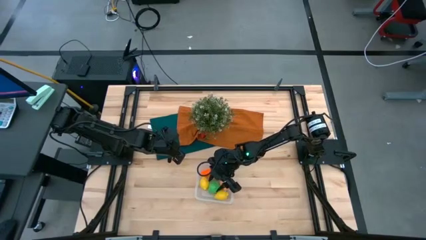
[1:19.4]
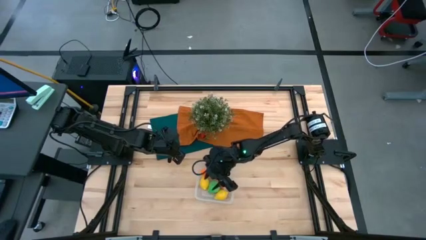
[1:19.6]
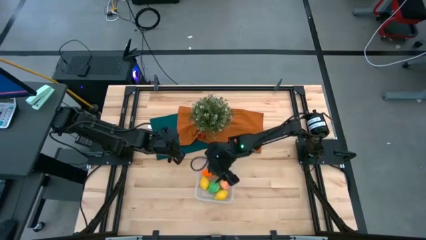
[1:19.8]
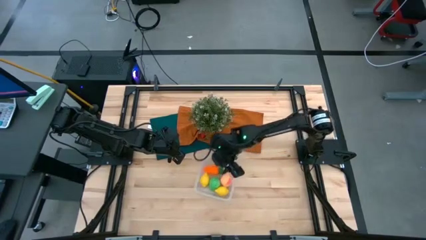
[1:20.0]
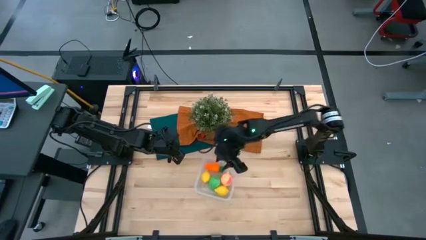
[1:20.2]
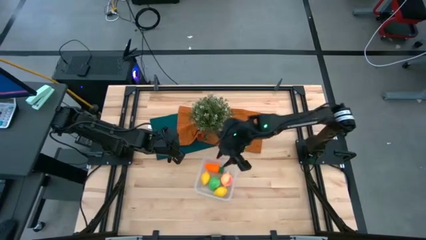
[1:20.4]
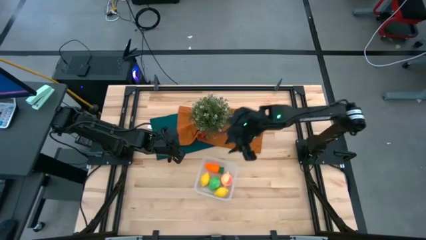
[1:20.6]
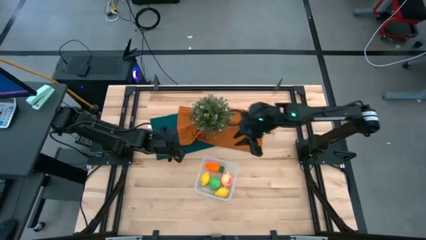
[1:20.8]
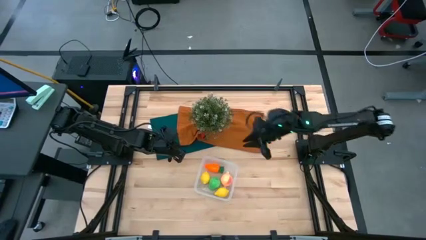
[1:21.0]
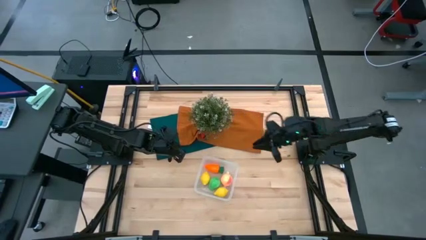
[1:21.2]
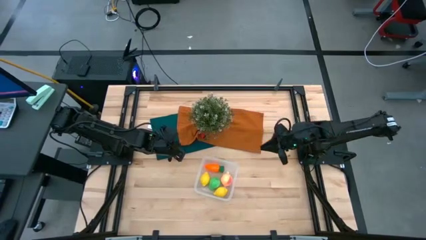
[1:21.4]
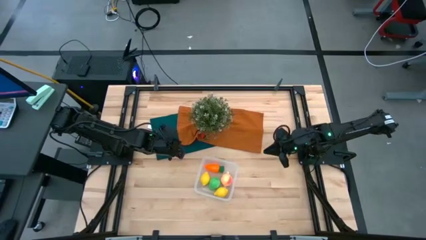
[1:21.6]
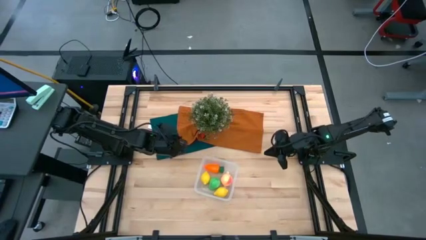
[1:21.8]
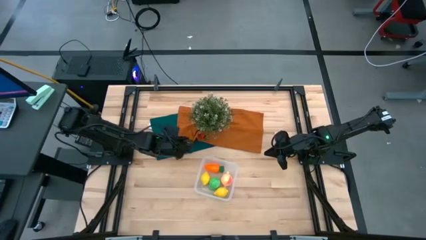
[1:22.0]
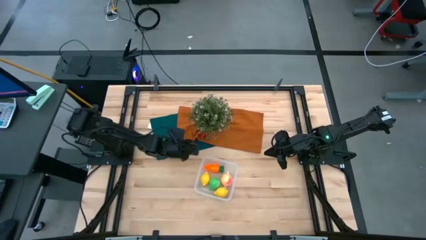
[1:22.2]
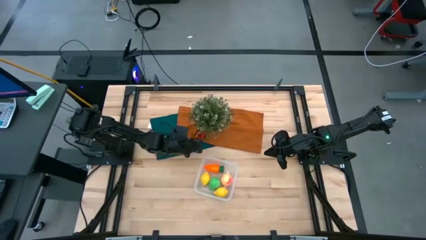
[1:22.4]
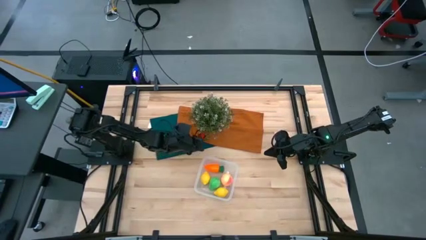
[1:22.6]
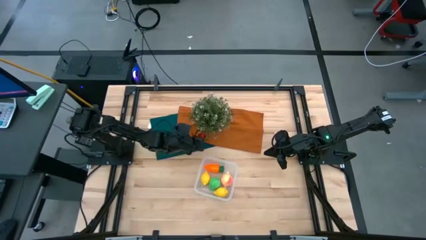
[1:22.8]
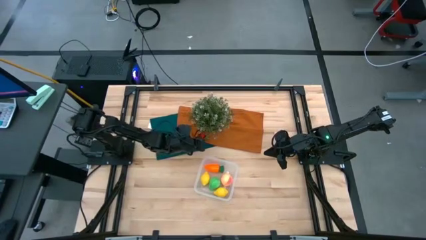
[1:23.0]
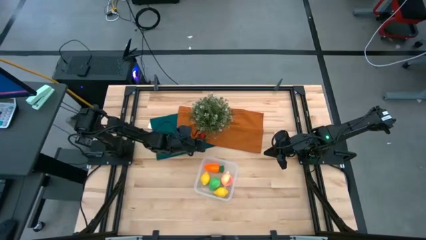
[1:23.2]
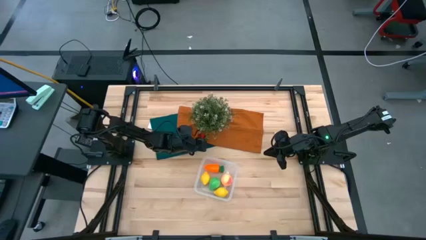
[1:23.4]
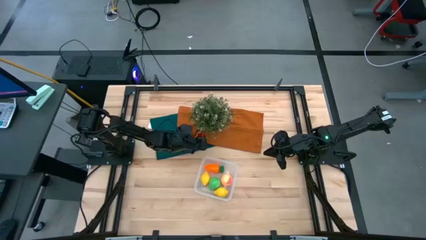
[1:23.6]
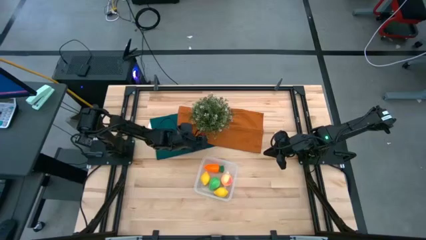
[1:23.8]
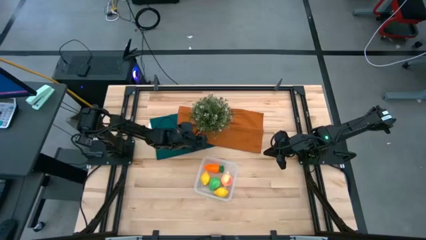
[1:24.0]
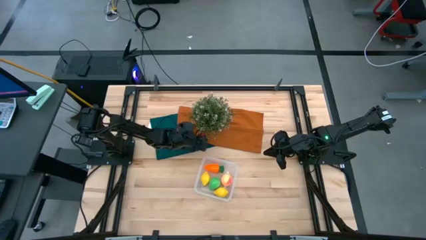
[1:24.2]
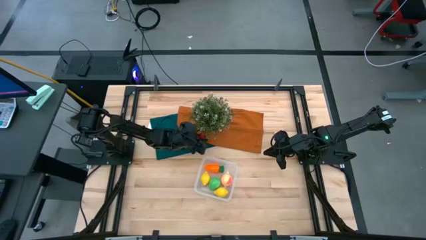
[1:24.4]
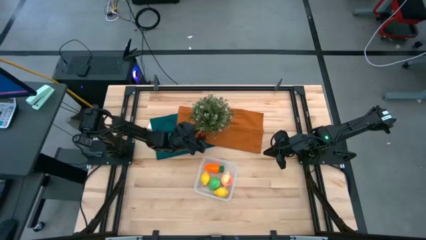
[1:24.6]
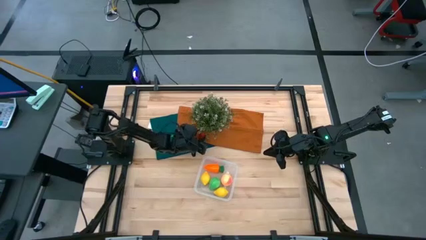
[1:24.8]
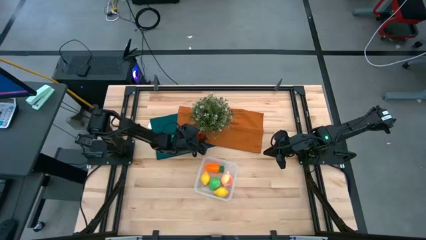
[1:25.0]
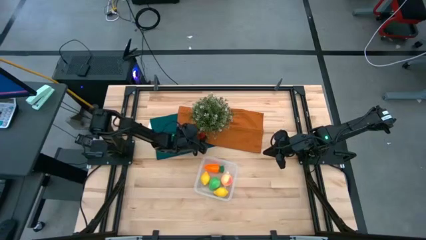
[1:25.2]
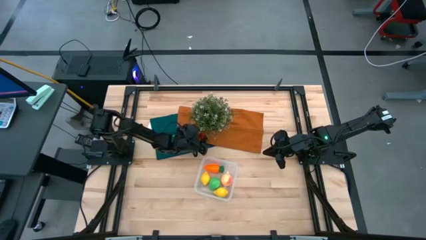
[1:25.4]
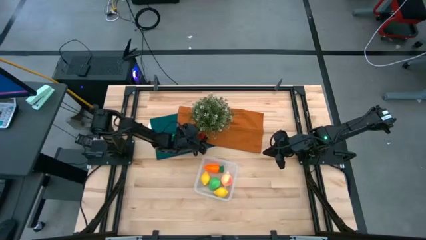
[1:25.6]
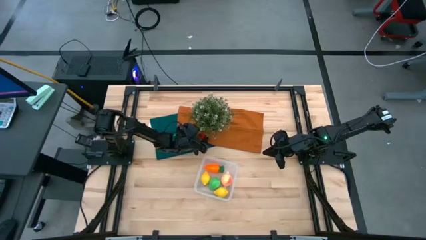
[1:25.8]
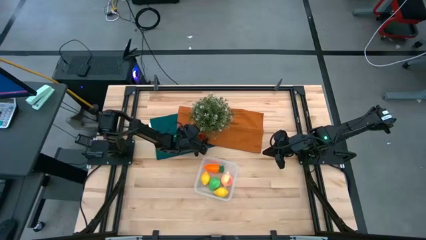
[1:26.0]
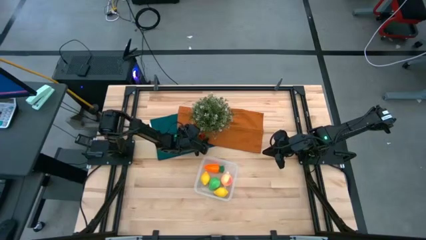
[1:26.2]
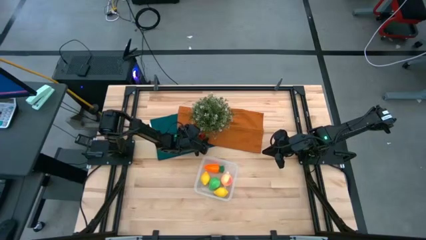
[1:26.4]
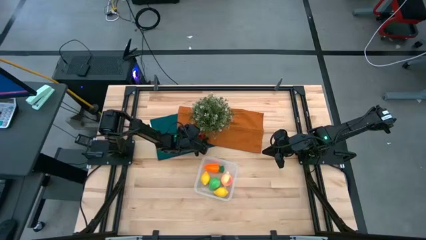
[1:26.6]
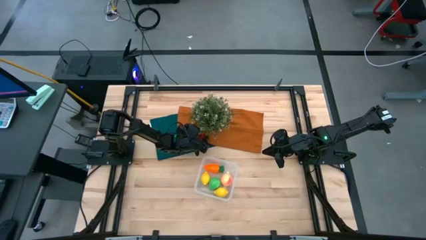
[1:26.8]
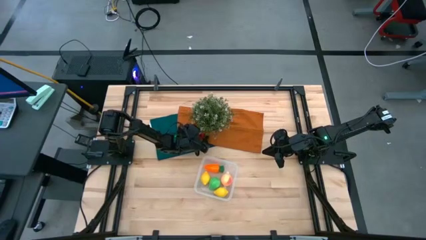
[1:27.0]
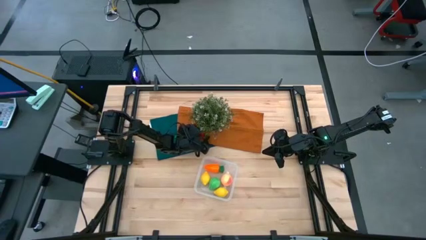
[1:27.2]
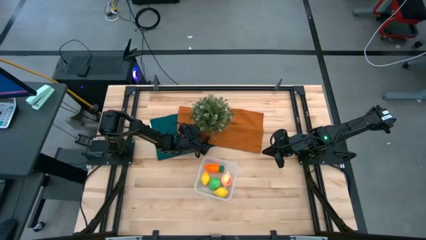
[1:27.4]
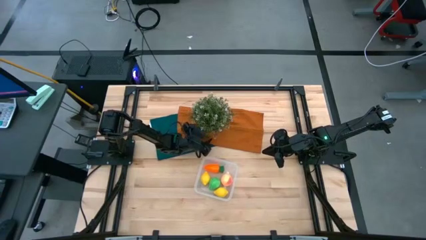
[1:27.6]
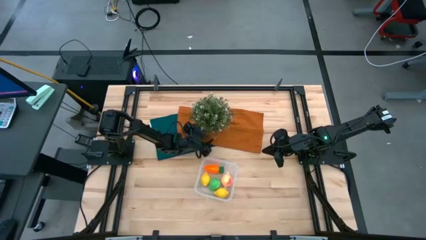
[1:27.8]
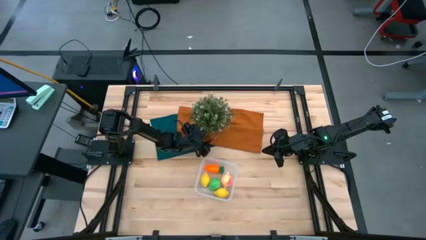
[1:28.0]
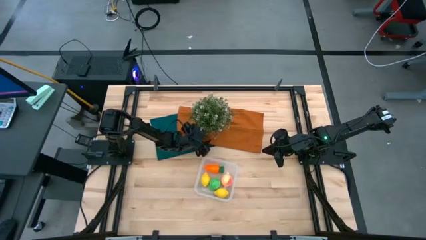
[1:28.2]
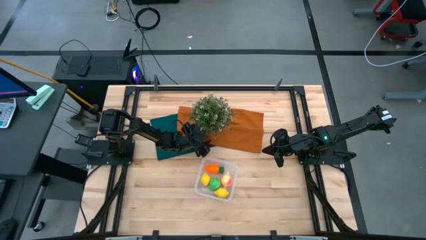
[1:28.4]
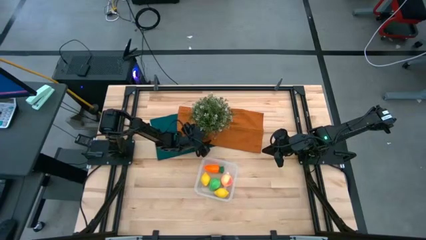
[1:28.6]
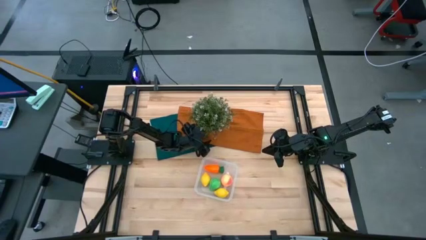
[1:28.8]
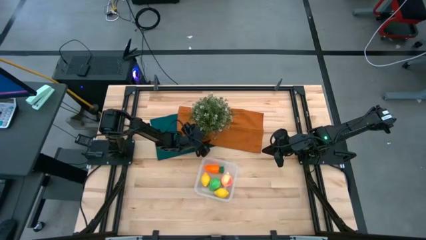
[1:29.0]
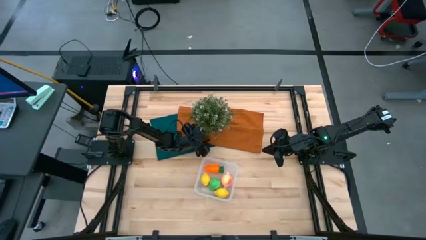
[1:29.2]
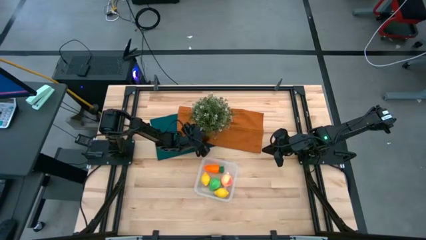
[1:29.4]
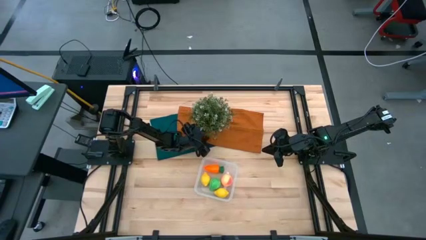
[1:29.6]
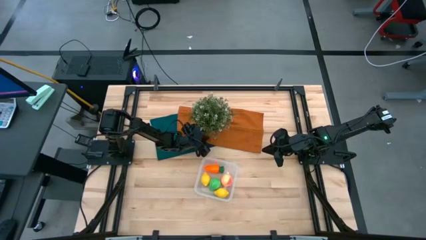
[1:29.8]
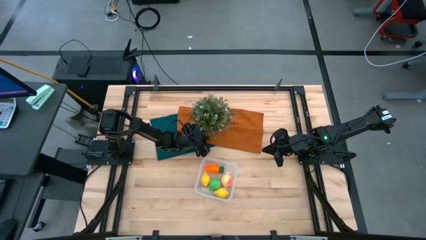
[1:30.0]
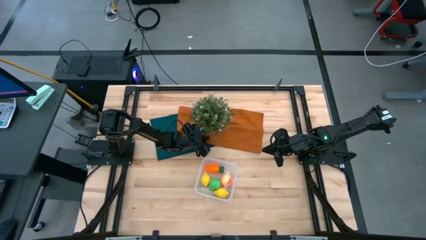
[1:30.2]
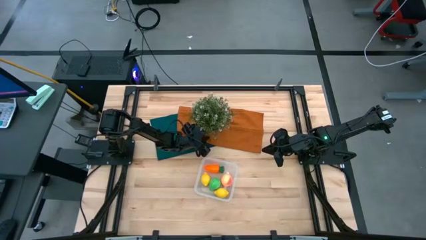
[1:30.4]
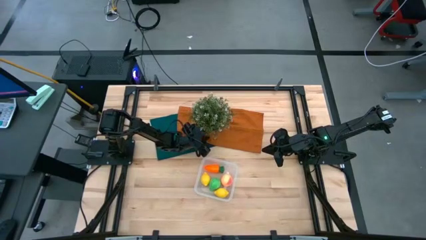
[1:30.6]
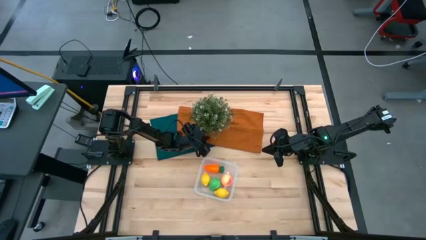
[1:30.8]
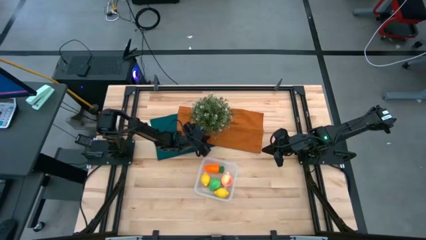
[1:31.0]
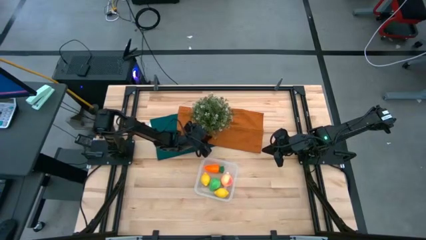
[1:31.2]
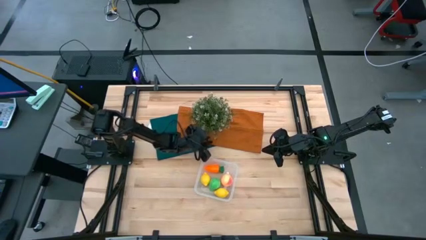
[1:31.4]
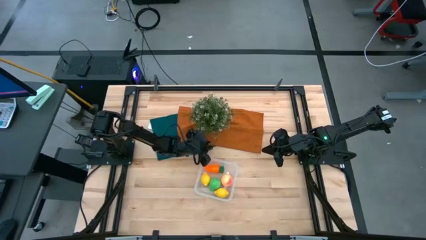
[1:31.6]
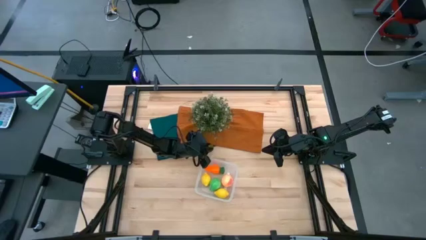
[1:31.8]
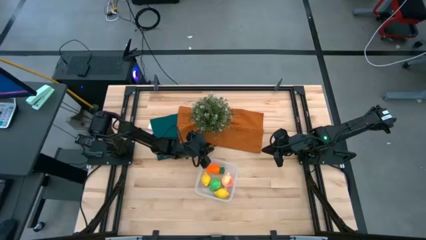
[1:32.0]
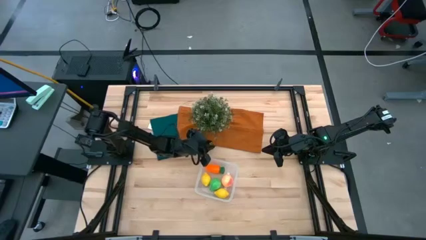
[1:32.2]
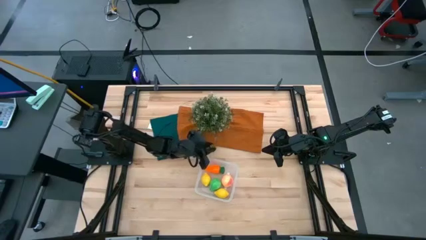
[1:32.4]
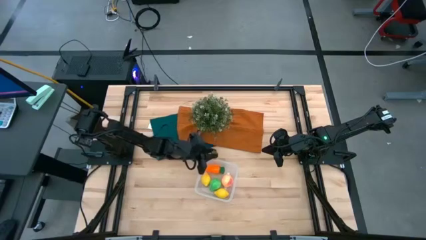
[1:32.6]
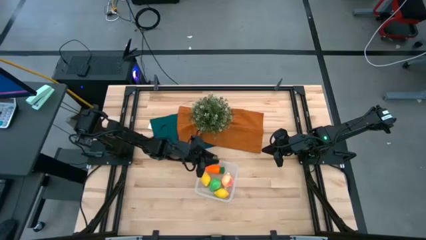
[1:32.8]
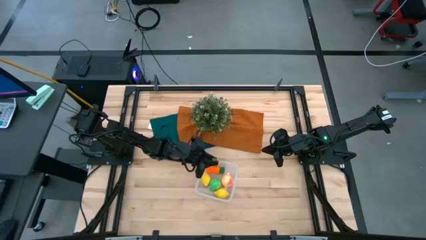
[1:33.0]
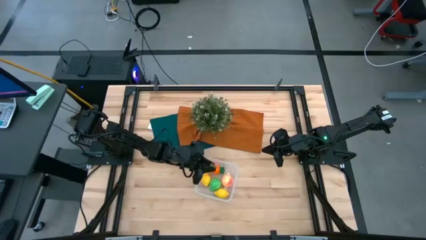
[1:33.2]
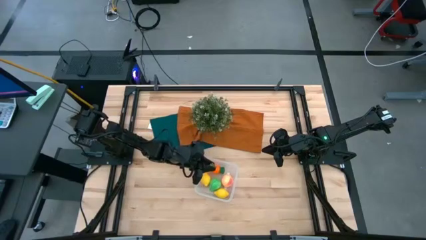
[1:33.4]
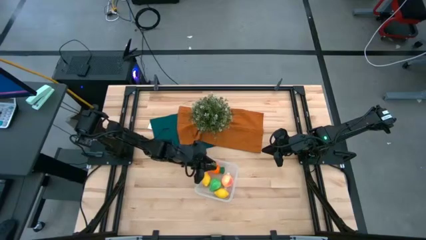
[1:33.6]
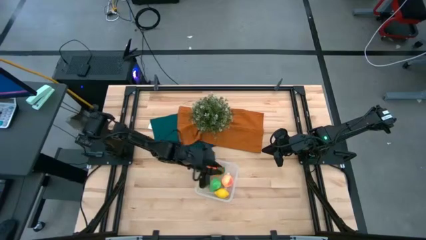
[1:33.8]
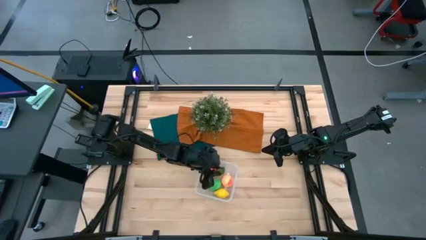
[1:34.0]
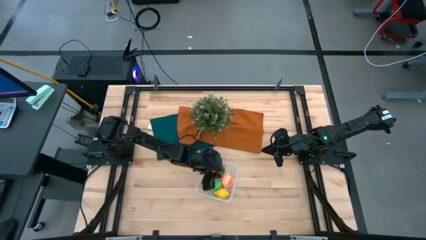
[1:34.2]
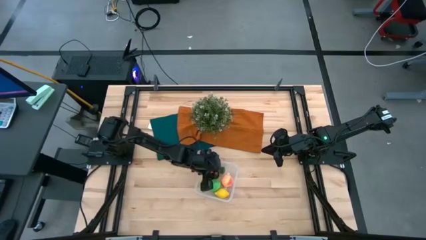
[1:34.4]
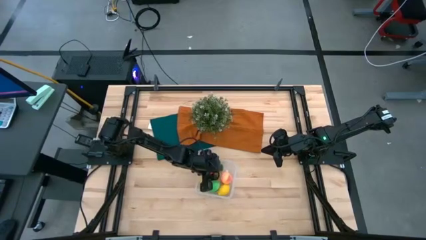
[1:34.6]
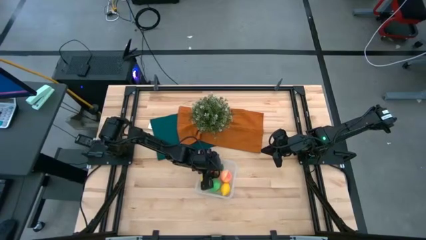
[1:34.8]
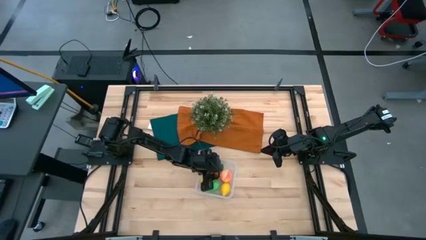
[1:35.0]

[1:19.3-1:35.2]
Task: Pick and placing Produce into tupperware
Put the strawberry into the transparent bin
